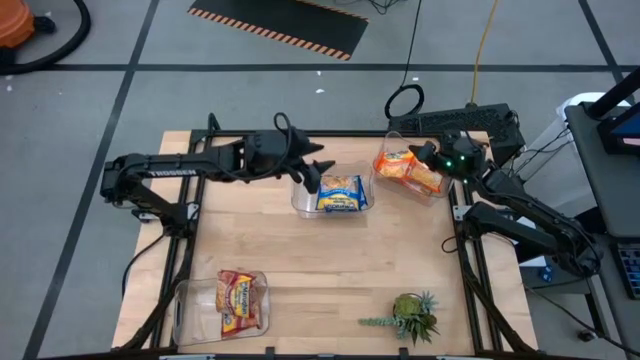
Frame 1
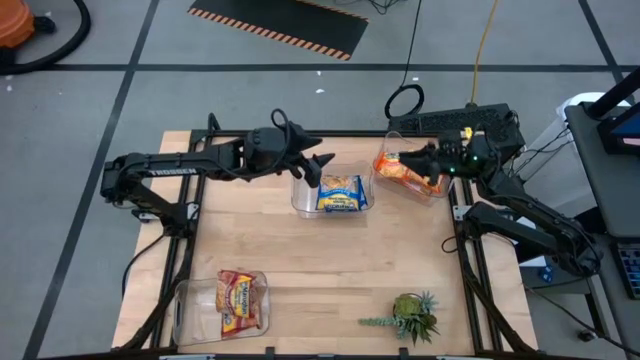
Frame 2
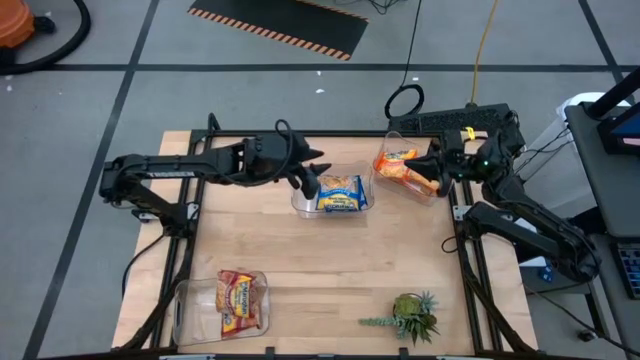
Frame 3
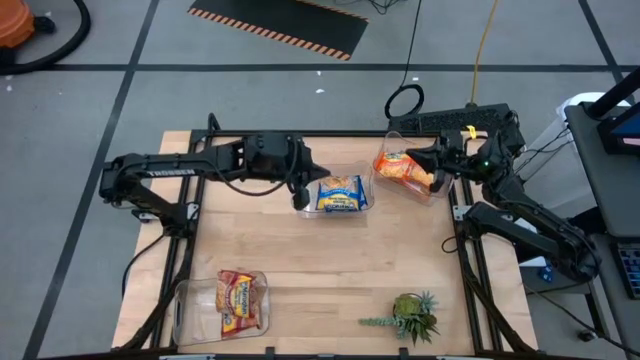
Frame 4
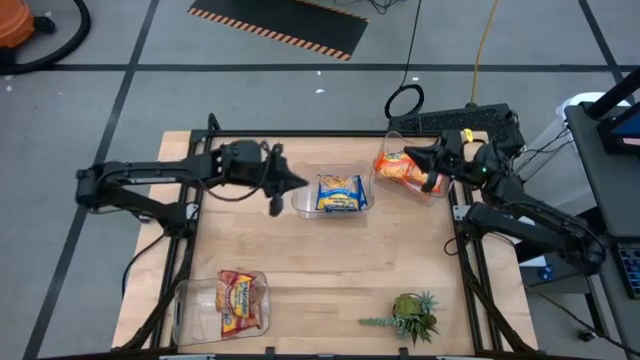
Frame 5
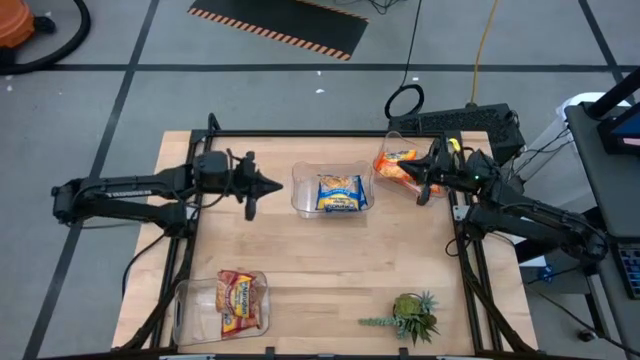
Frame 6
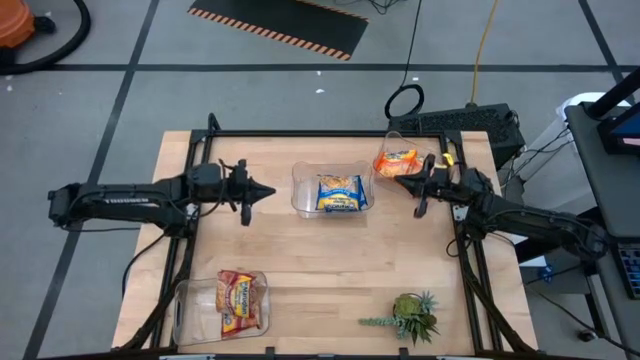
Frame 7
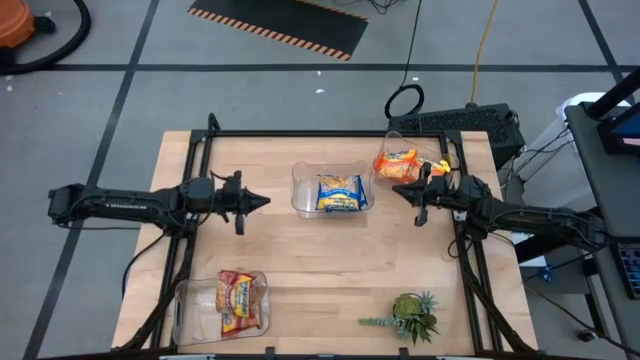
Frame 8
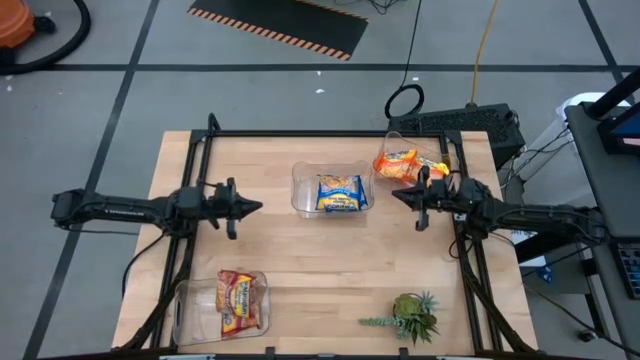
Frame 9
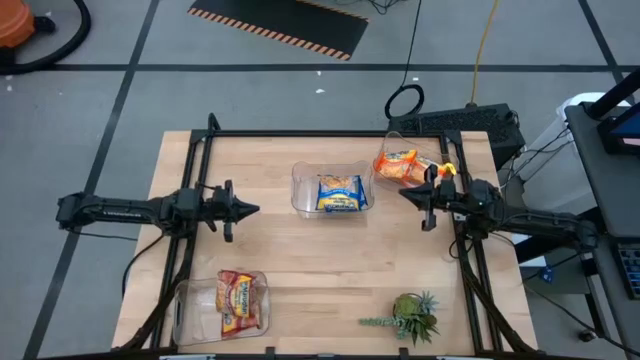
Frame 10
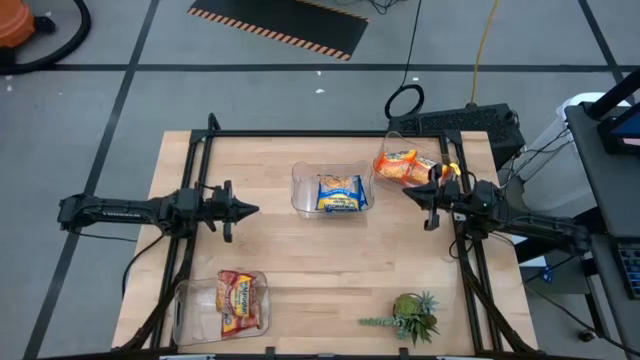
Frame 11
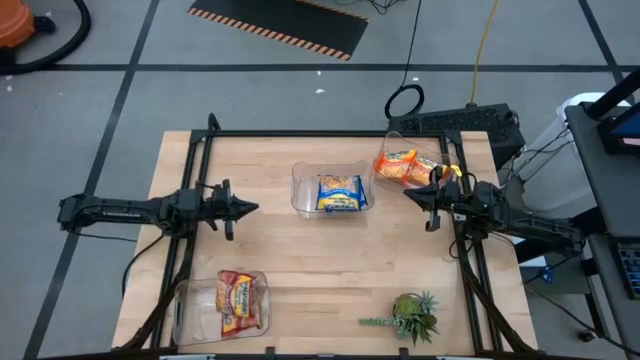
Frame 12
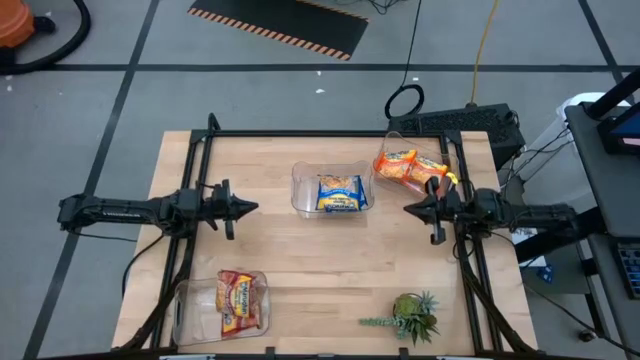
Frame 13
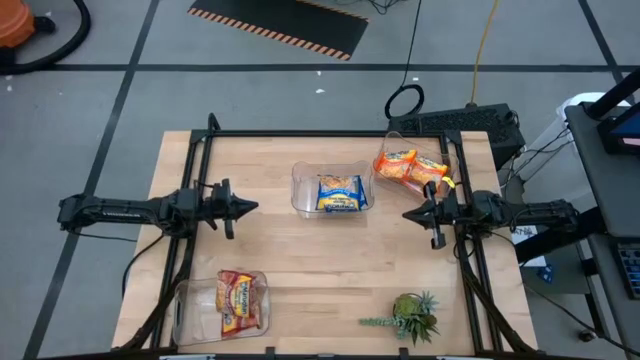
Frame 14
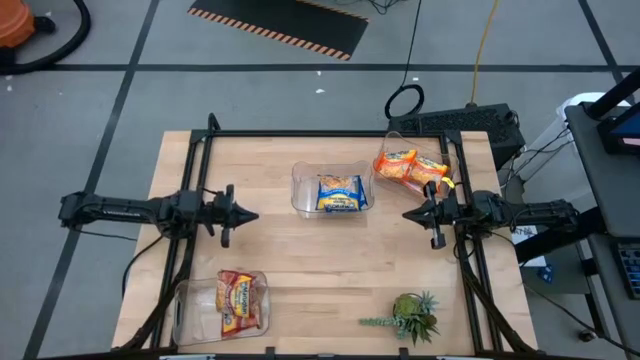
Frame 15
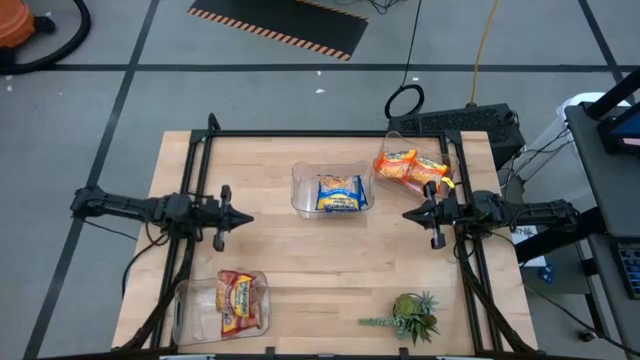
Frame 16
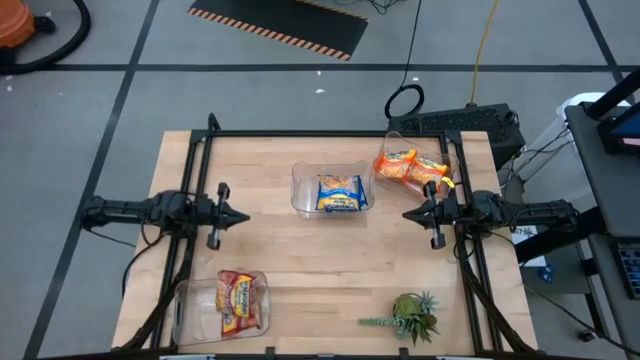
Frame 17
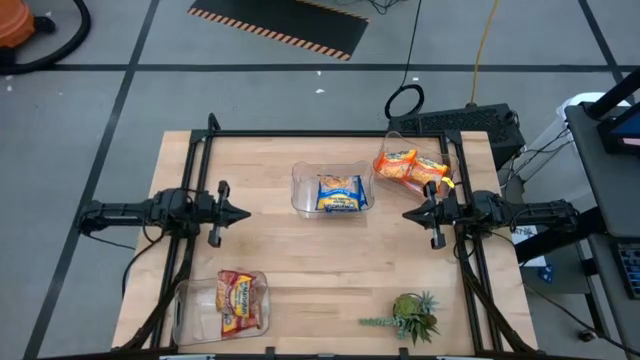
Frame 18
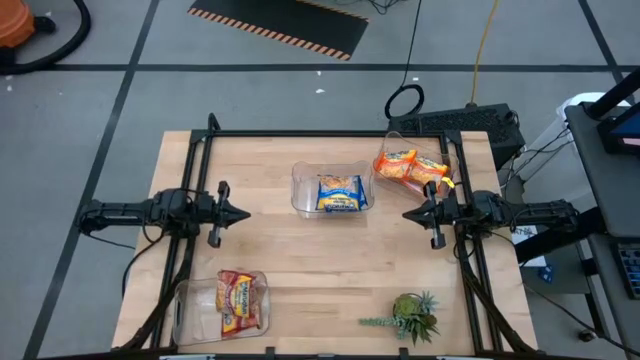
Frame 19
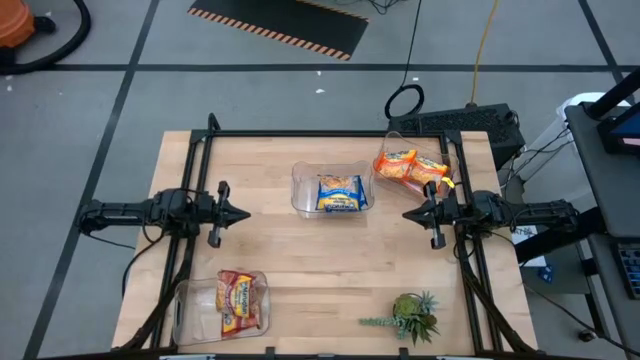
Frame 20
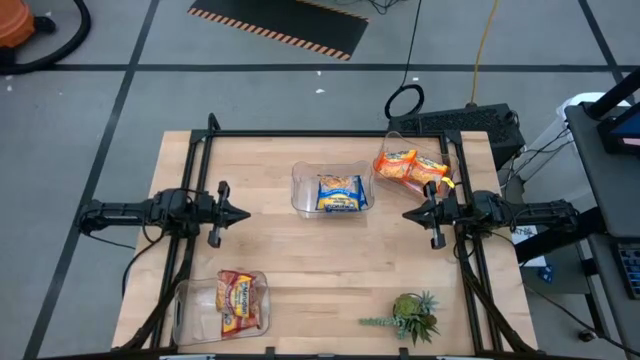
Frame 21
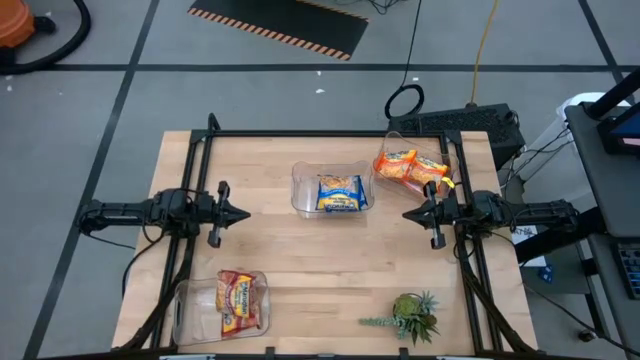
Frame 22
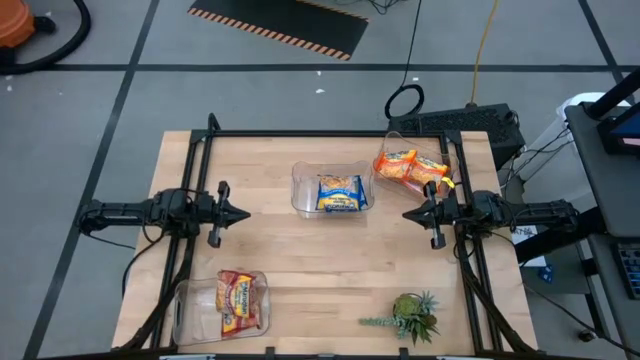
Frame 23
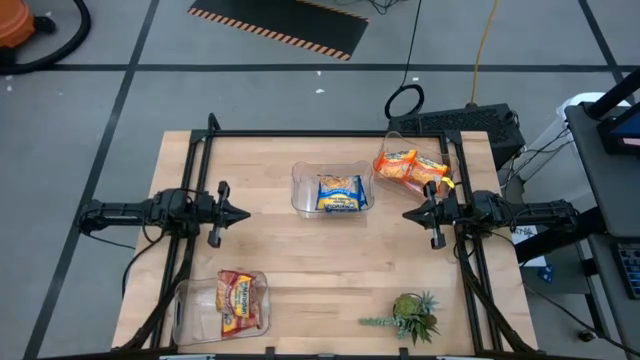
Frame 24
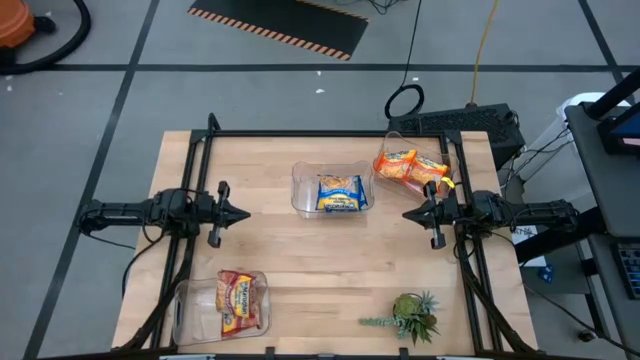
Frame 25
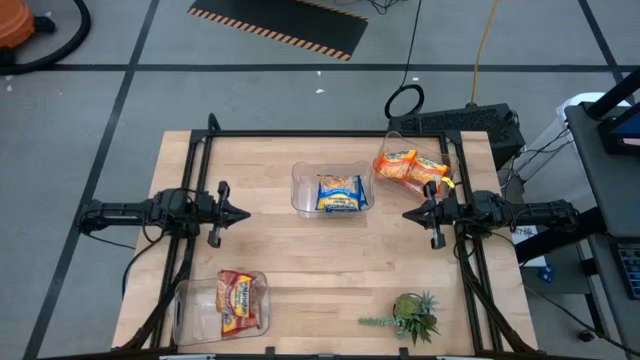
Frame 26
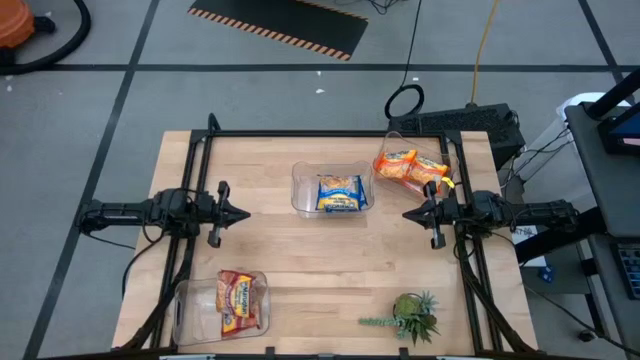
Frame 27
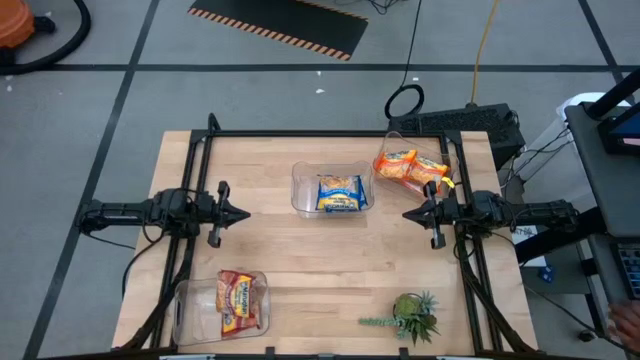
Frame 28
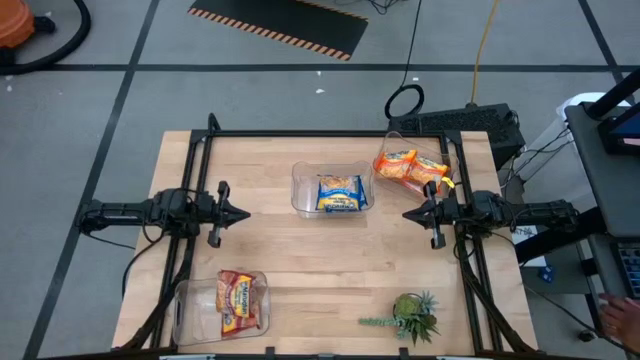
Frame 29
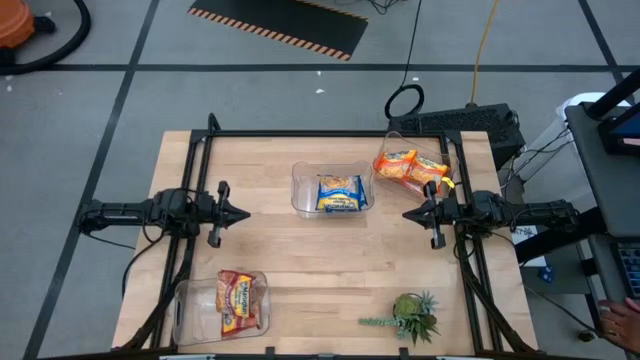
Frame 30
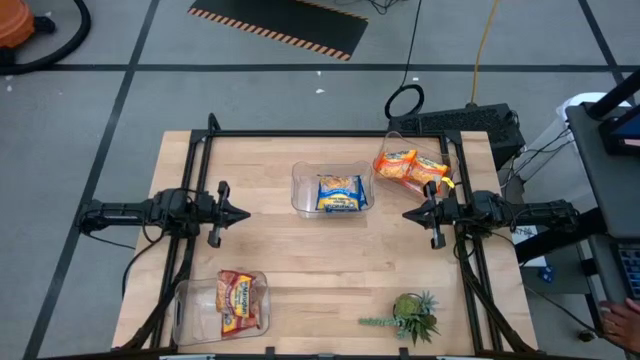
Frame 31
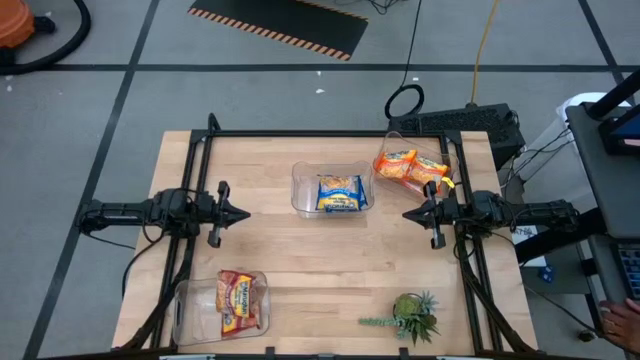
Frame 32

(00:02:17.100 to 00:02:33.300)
Task: Sort Maruchan noodles
Return to Home Position

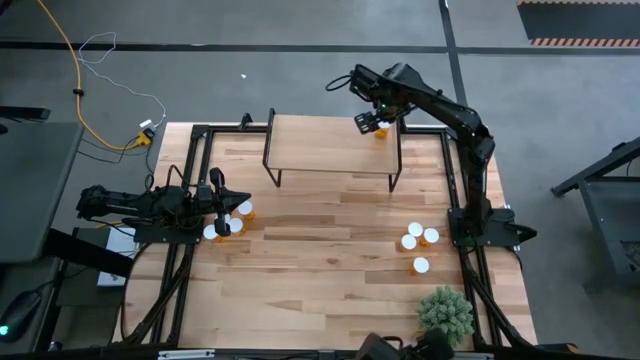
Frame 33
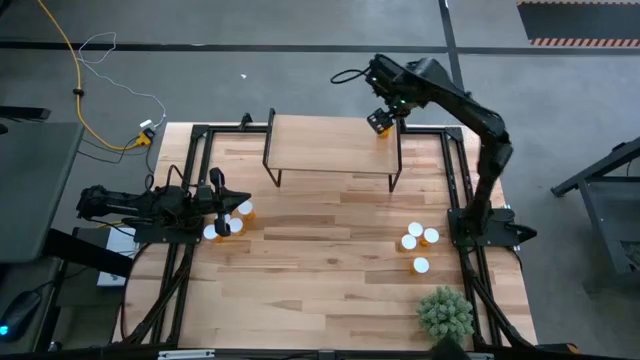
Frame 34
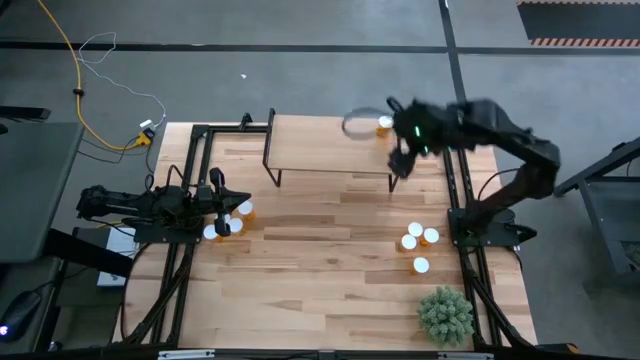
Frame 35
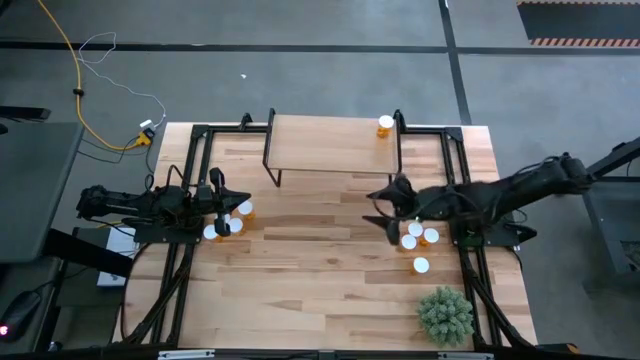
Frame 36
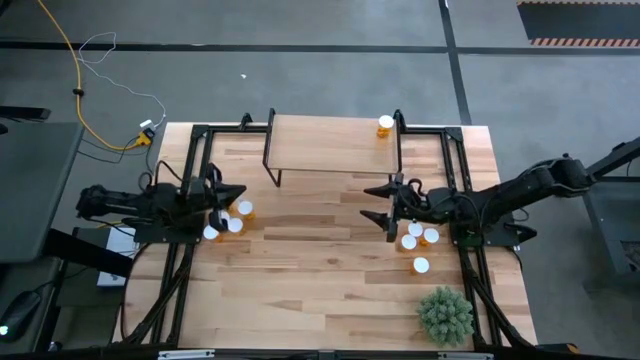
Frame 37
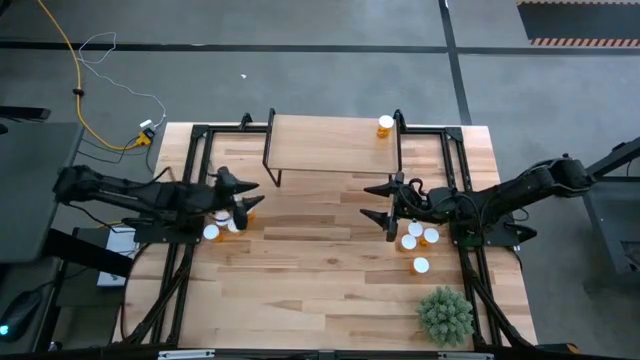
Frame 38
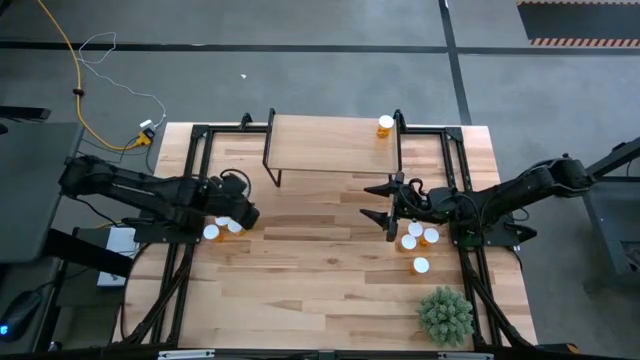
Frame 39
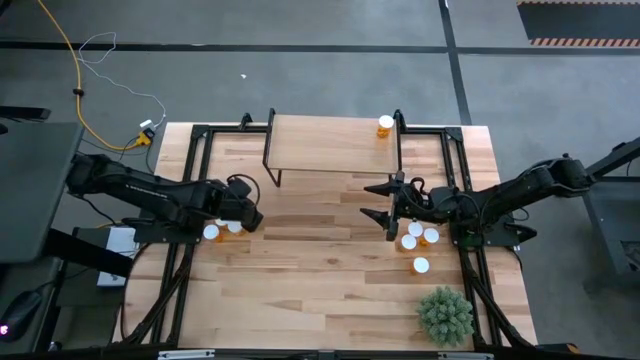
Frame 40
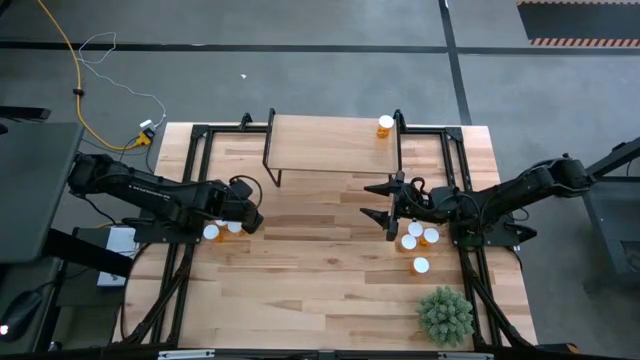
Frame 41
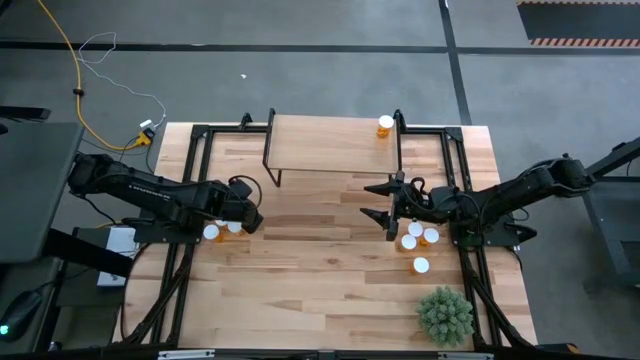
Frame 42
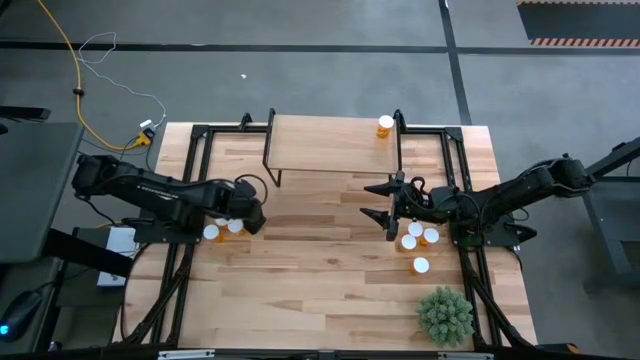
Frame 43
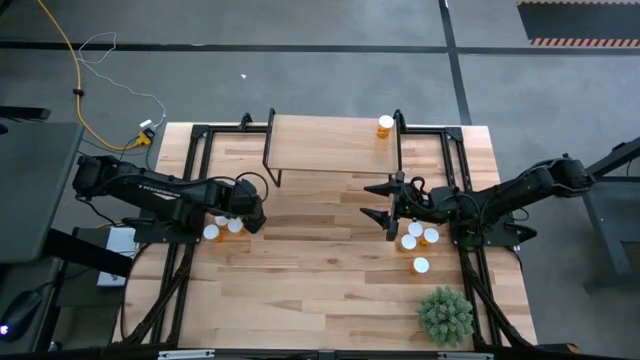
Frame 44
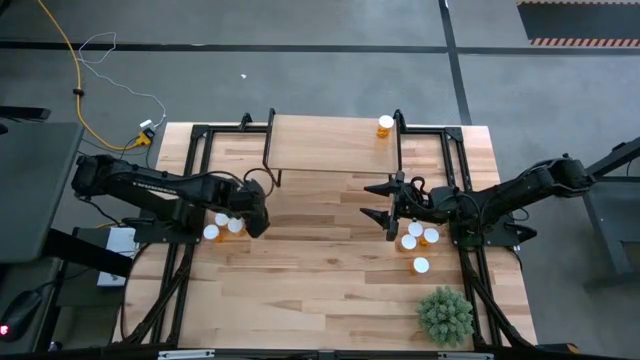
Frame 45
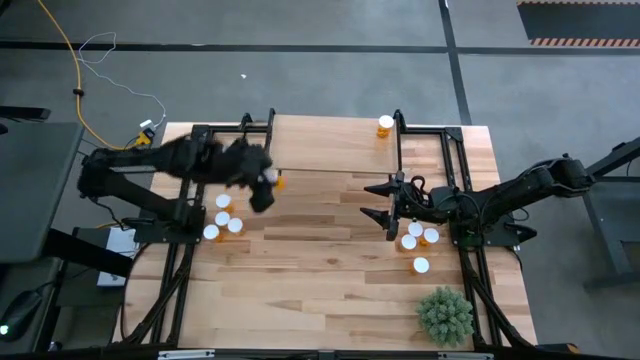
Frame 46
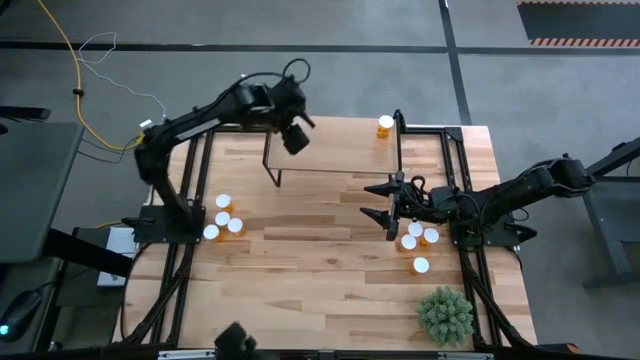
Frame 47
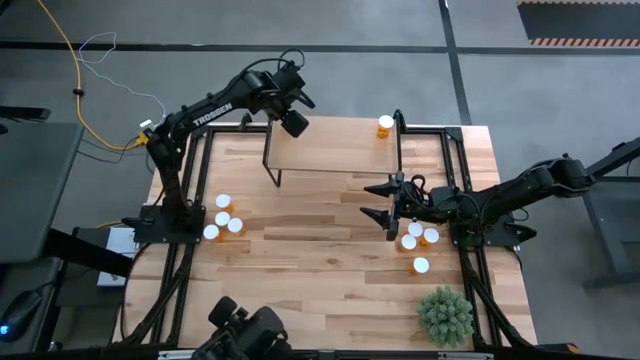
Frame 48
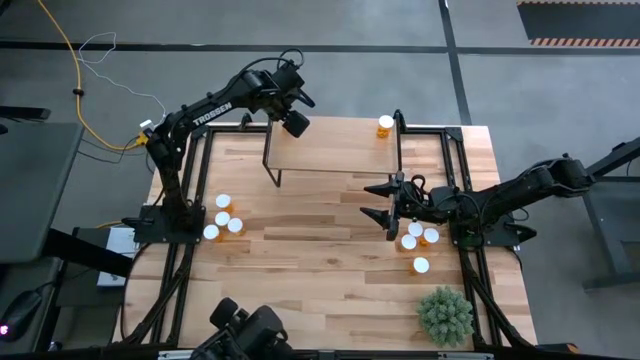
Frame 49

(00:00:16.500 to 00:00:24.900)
Task: Pick and place medicine bottles onto shelf by color
Put the yellow pill bottle on the shelf
